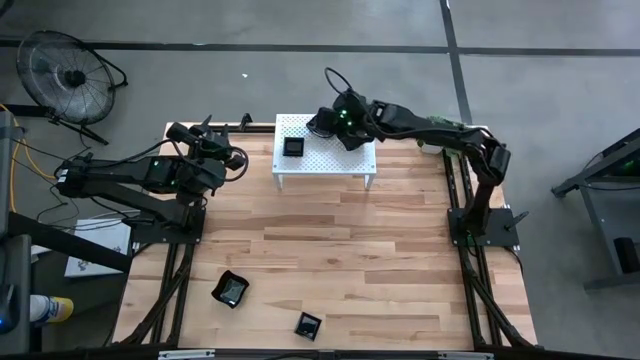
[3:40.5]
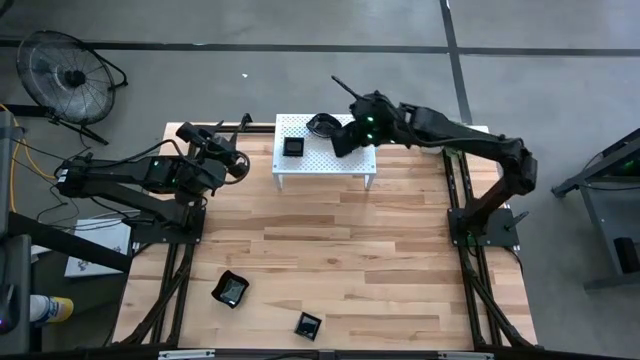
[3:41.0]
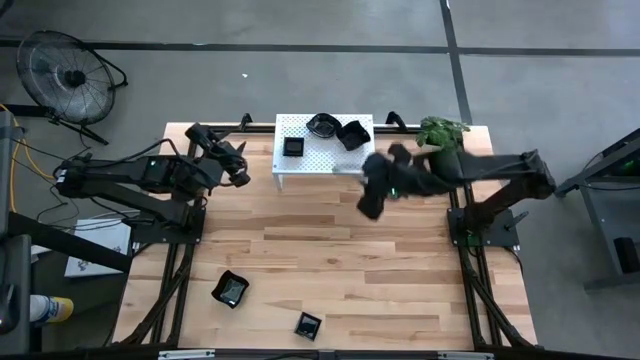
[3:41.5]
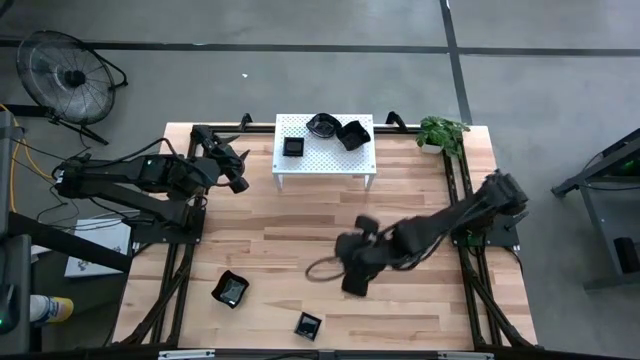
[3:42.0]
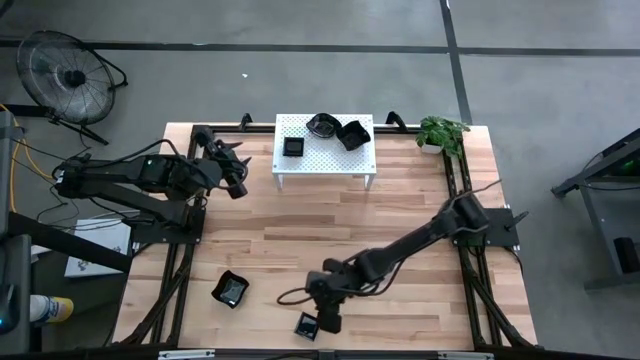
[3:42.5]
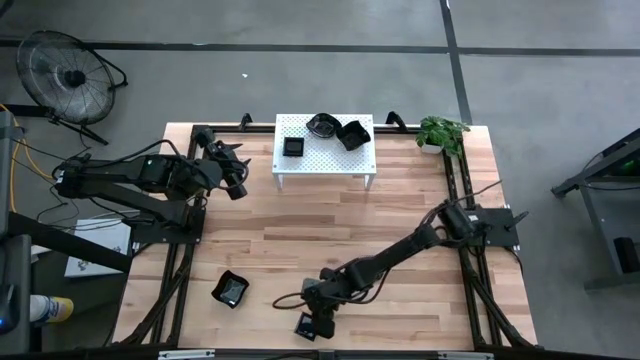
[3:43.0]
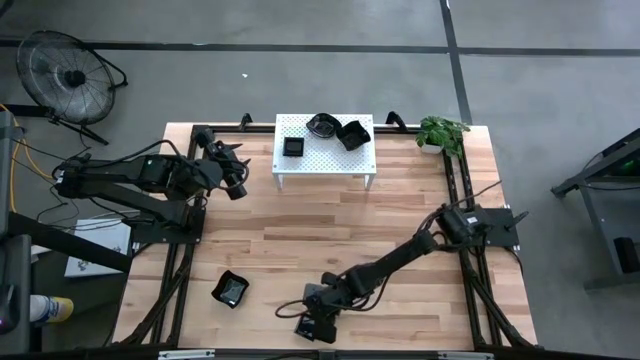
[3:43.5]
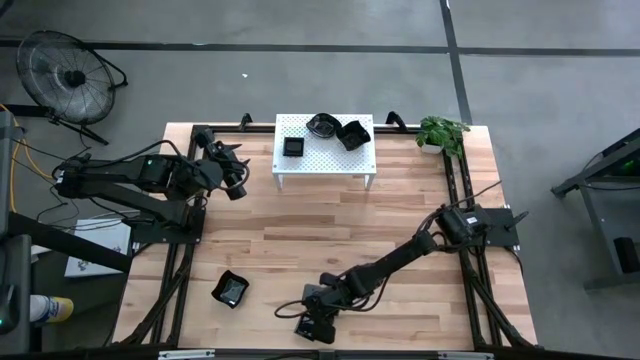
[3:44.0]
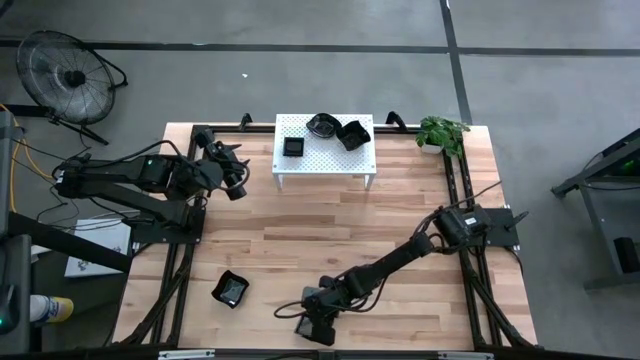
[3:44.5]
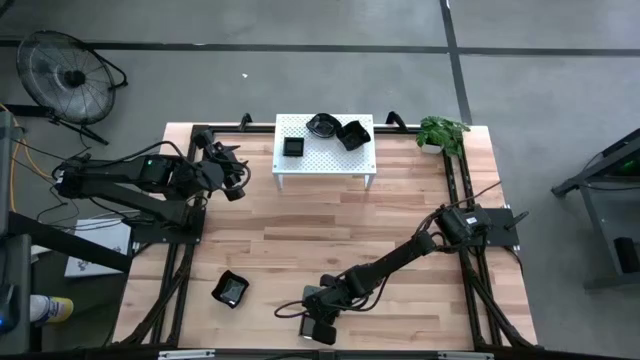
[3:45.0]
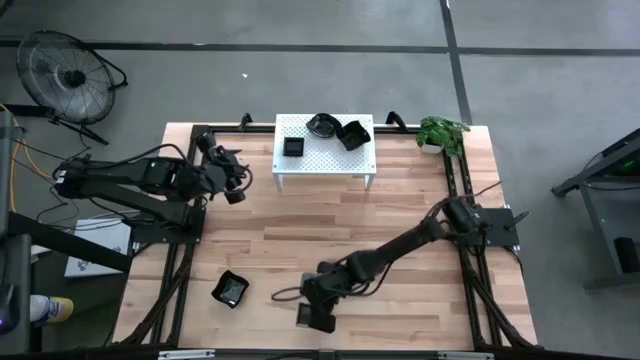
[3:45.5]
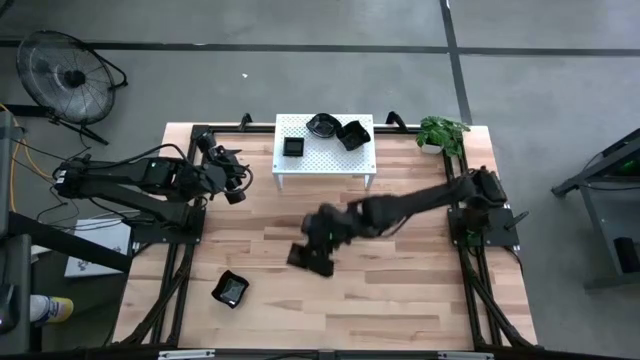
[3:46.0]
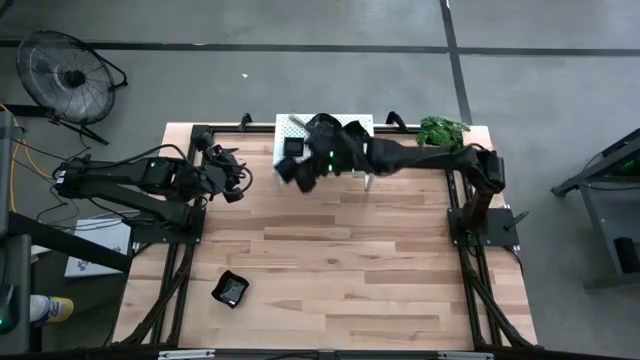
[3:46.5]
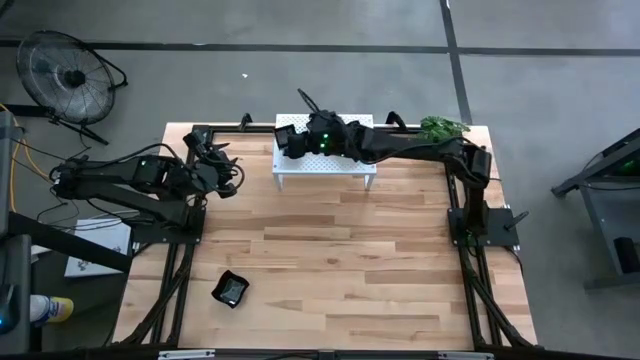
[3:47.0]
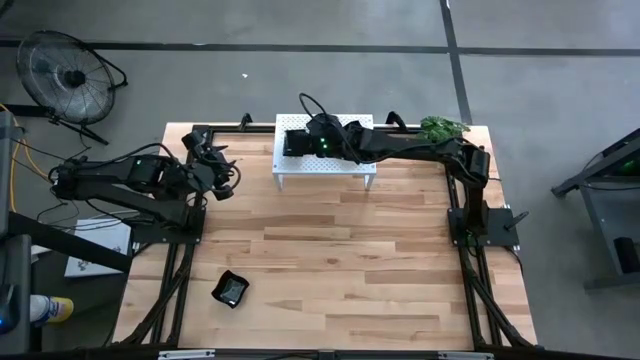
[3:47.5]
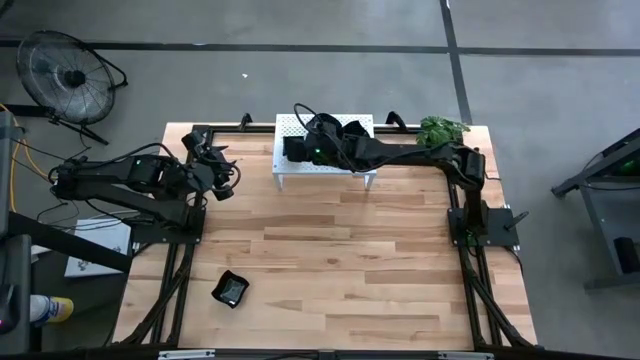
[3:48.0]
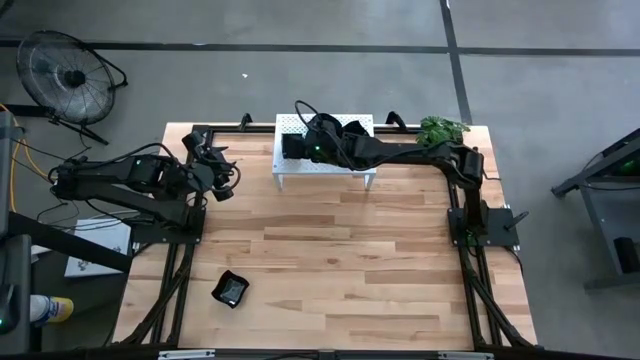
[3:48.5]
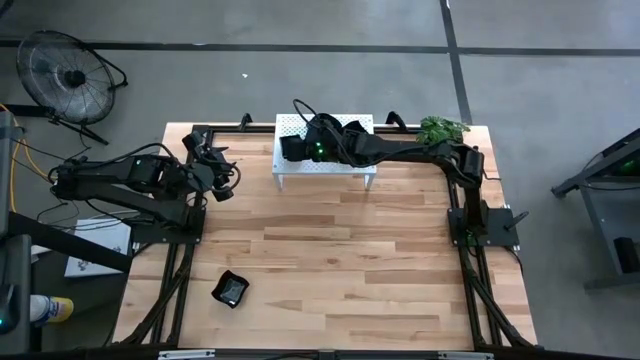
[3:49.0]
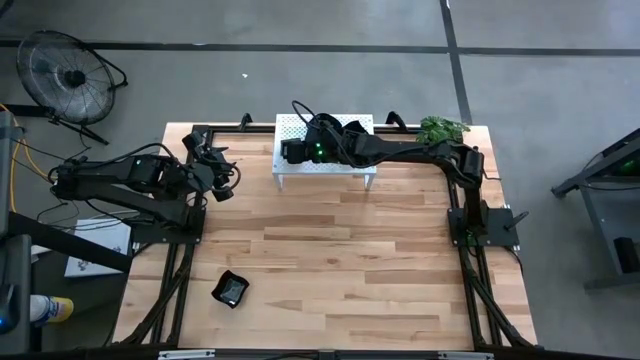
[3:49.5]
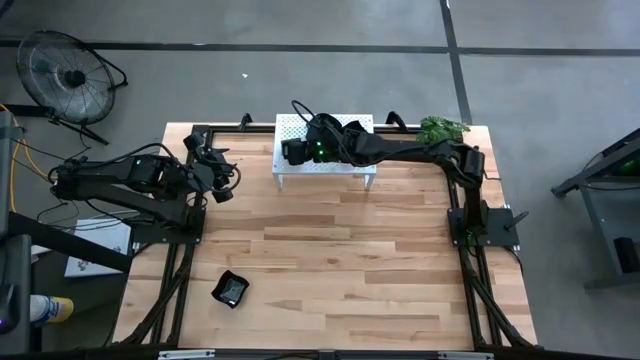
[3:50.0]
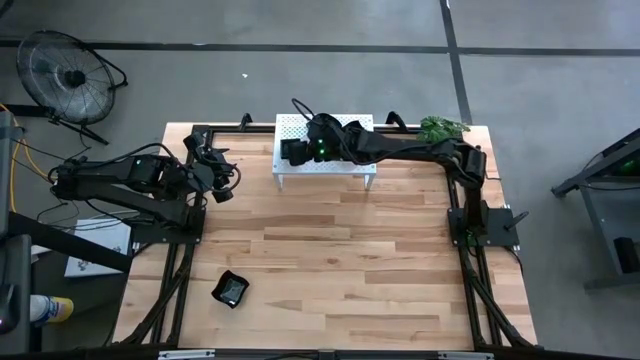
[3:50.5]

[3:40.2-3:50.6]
Task: Pick & Place Mini shaped plates
Stack the black square plate on top of the black square plate on the shelf

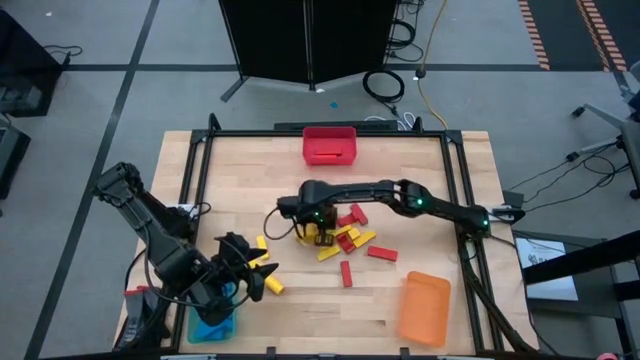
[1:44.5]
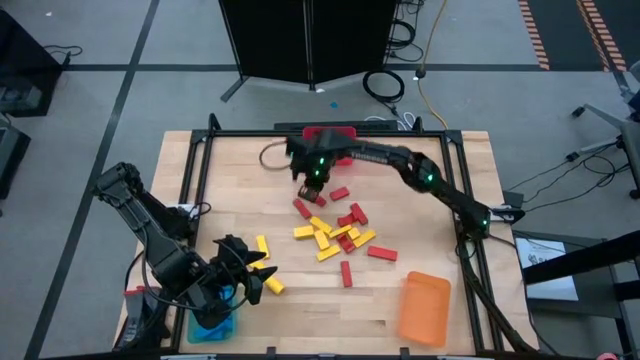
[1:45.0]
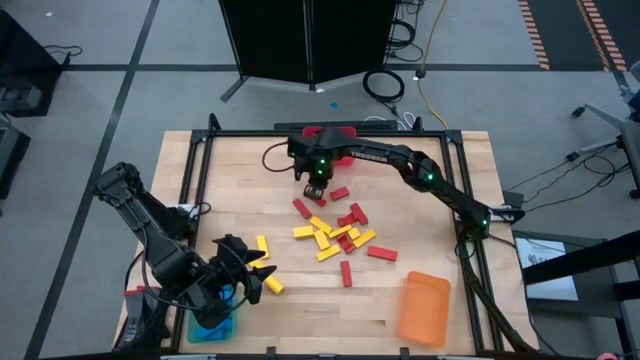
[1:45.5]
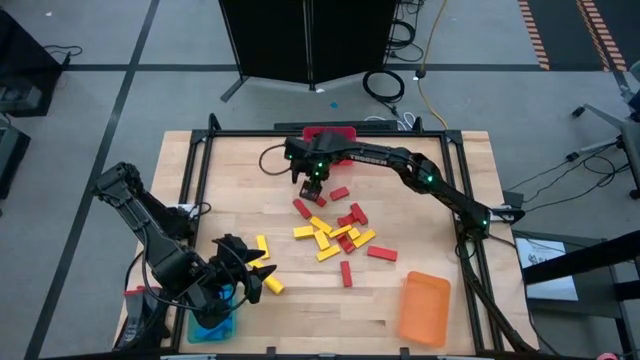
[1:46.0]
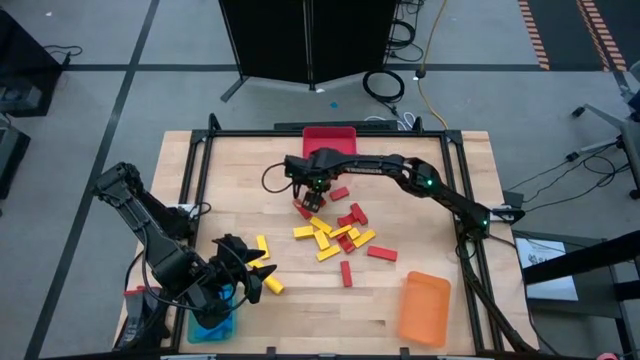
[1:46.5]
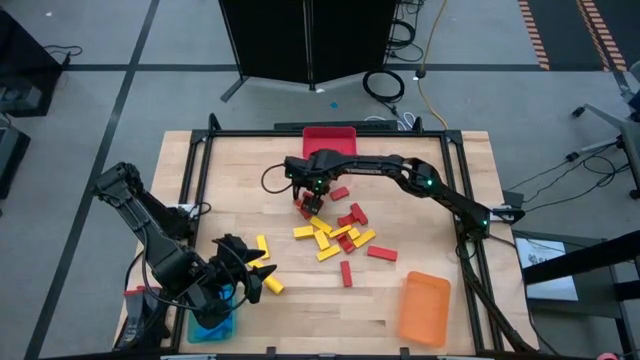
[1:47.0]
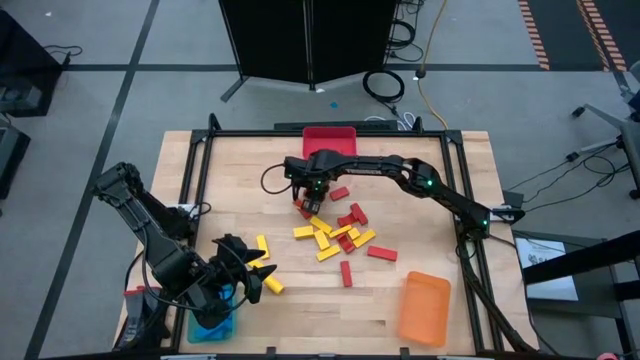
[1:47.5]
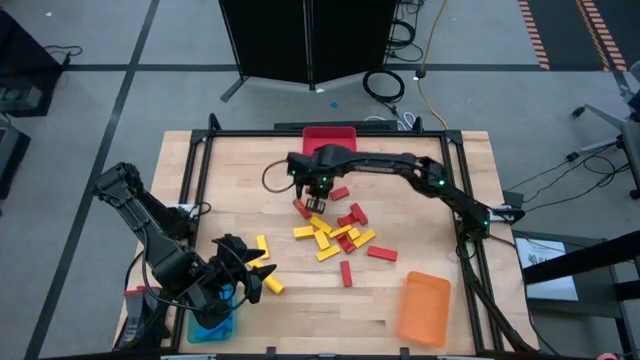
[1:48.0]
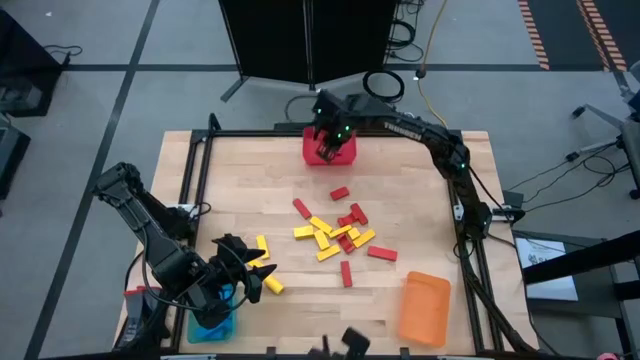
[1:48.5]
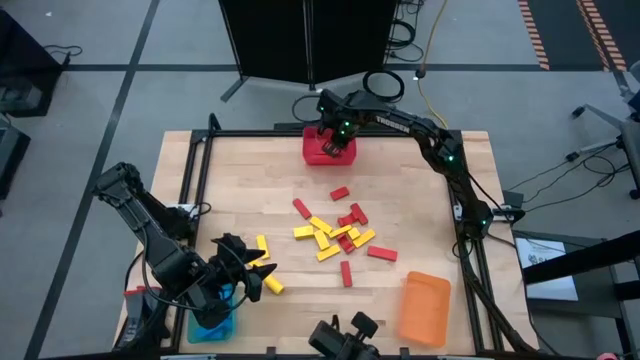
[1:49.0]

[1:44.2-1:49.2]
Task: Sort blocks
Put the red block into the red bin

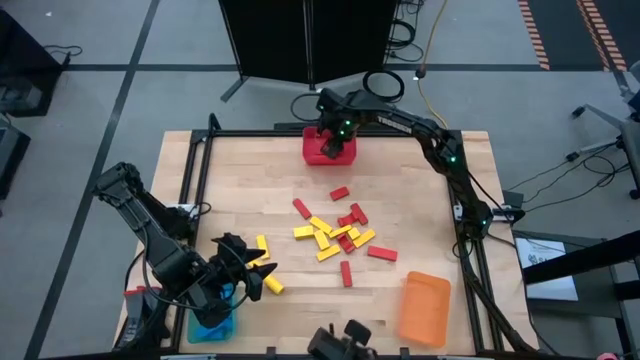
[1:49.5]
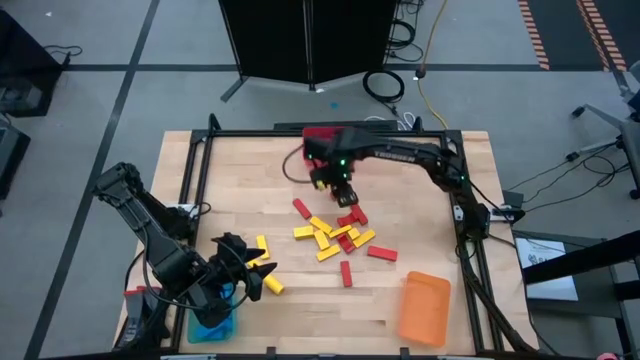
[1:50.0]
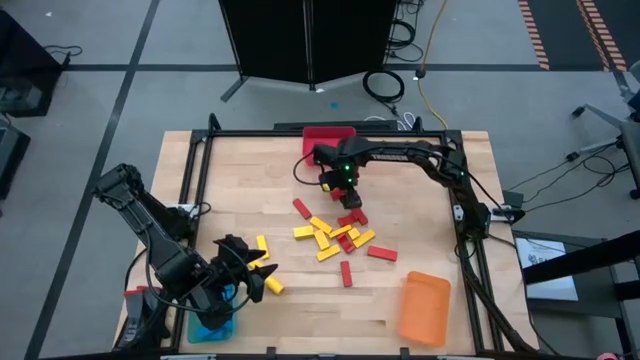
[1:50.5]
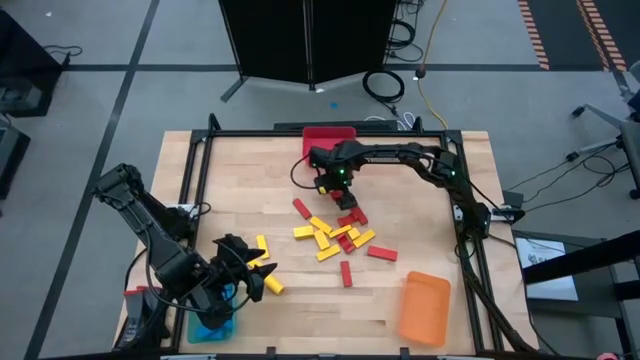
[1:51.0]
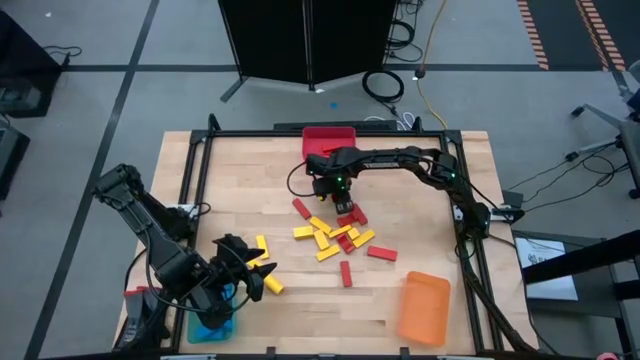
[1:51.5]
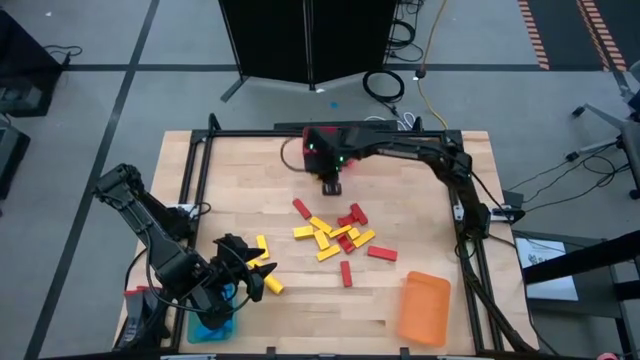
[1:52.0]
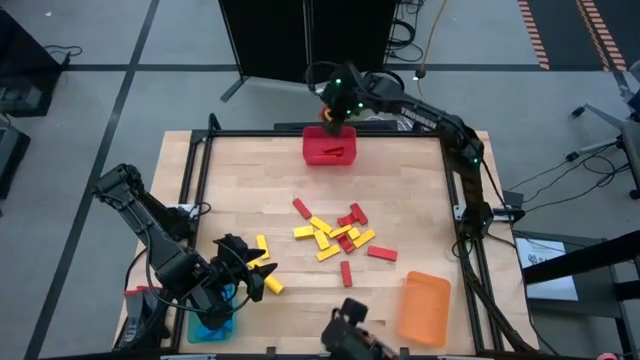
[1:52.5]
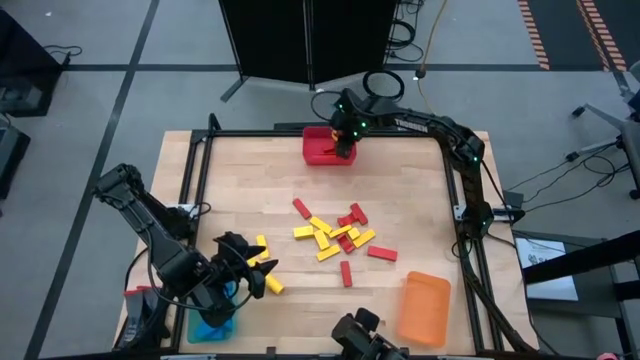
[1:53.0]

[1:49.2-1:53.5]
Put the red block into the red bin

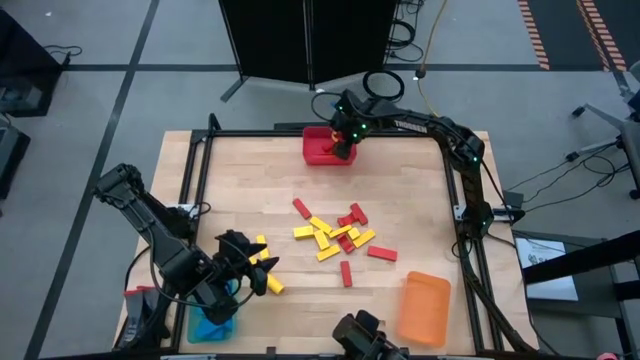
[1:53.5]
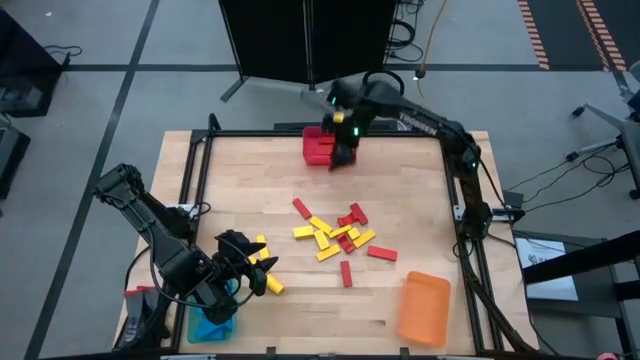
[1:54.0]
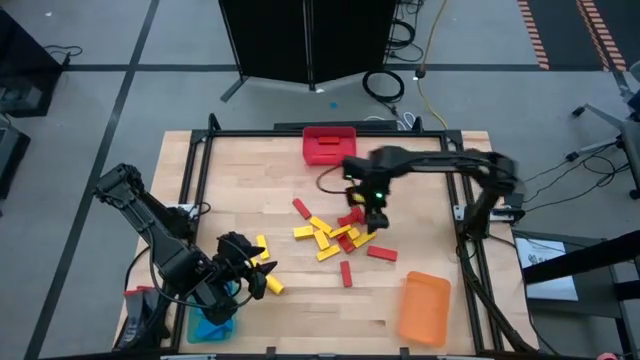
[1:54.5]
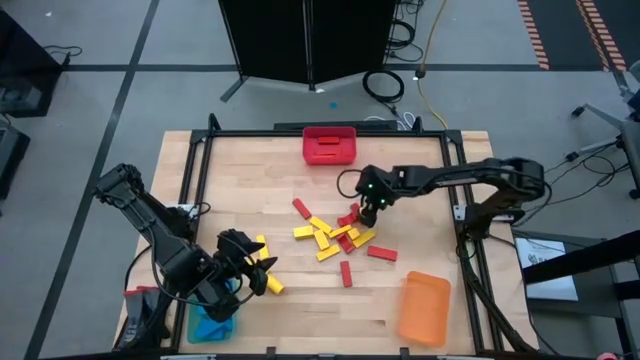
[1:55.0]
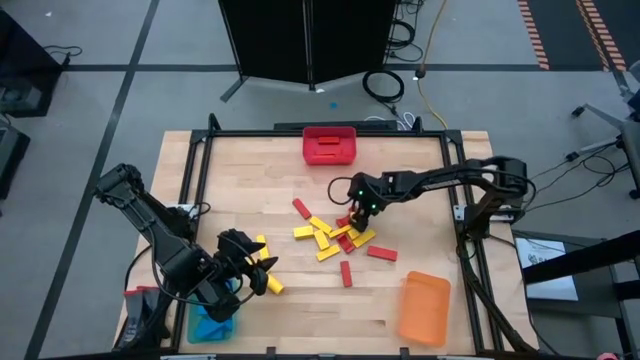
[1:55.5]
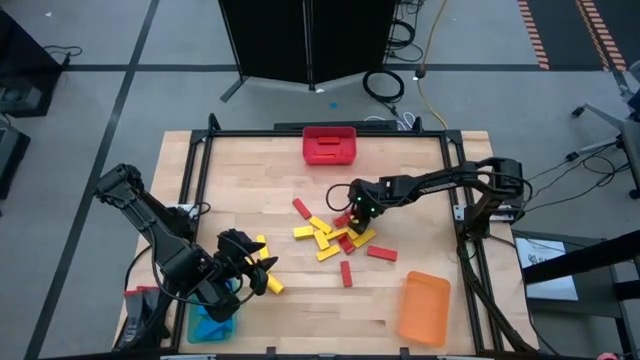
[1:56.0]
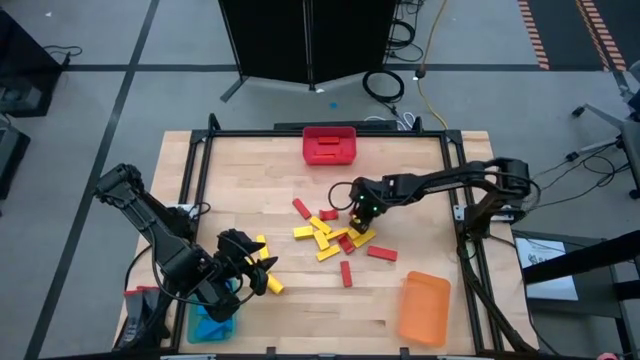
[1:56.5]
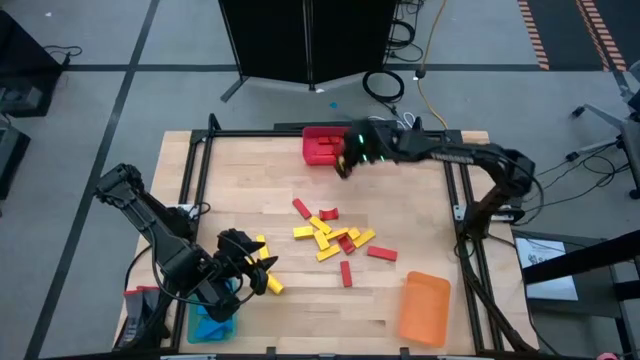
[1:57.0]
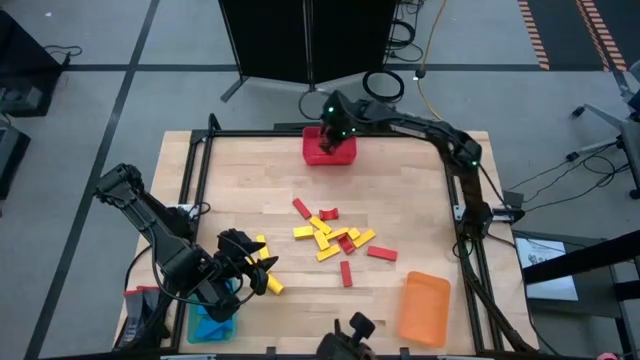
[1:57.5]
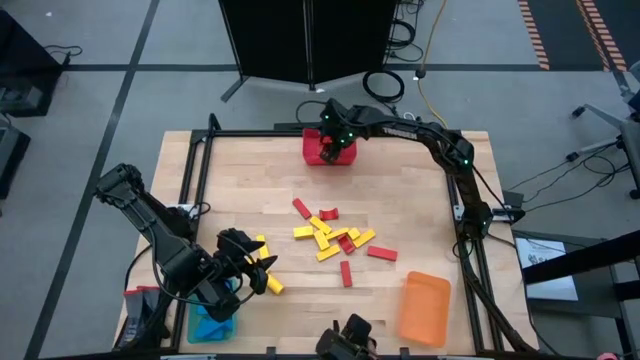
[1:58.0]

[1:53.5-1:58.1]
Put the red block into the red bin
